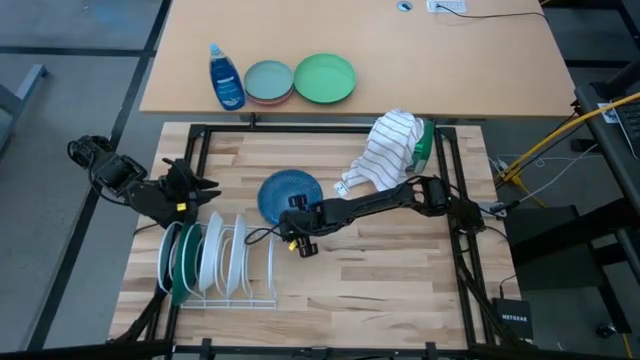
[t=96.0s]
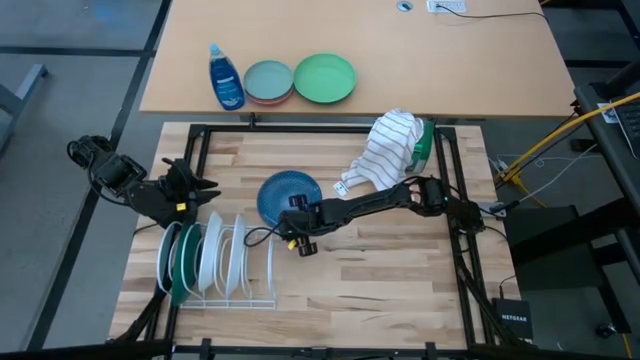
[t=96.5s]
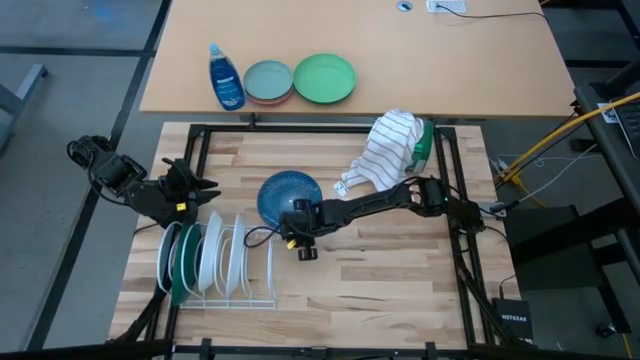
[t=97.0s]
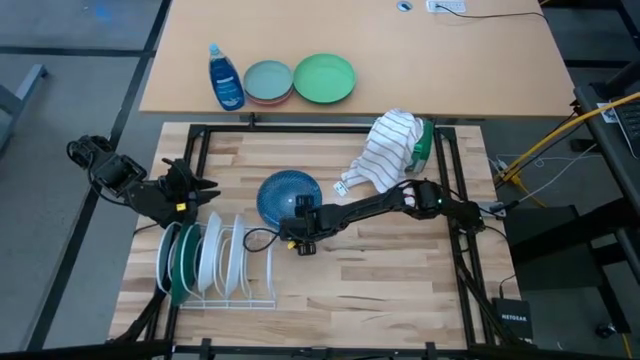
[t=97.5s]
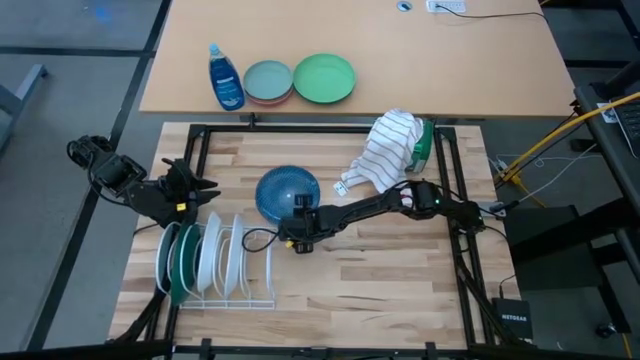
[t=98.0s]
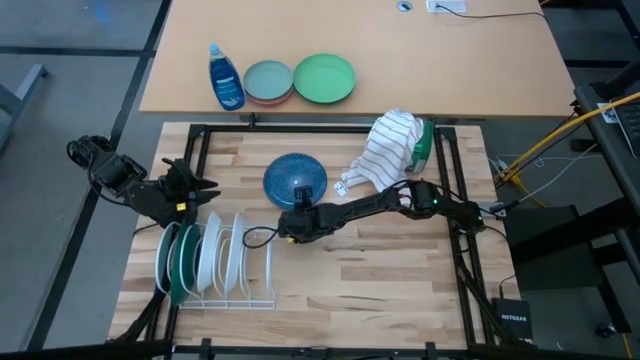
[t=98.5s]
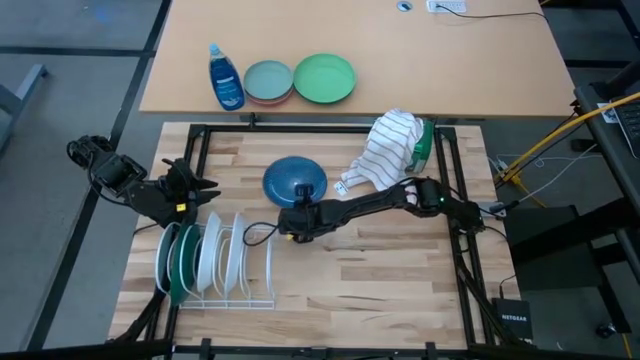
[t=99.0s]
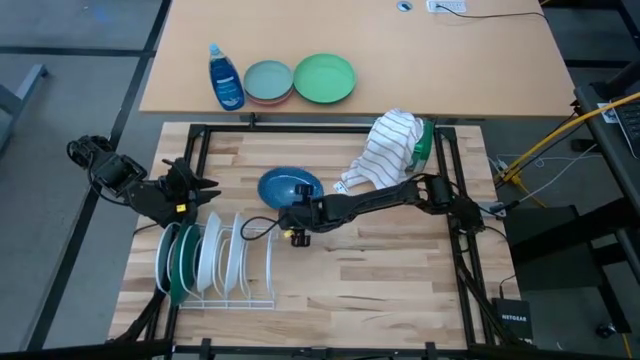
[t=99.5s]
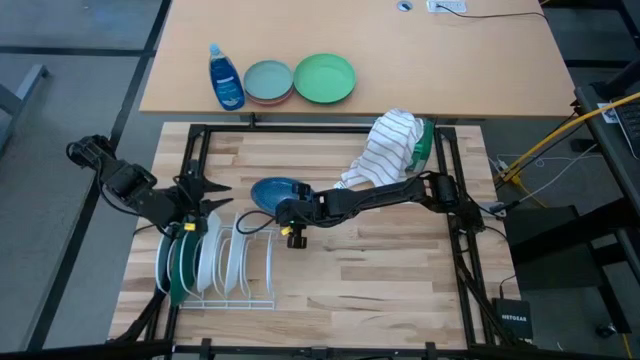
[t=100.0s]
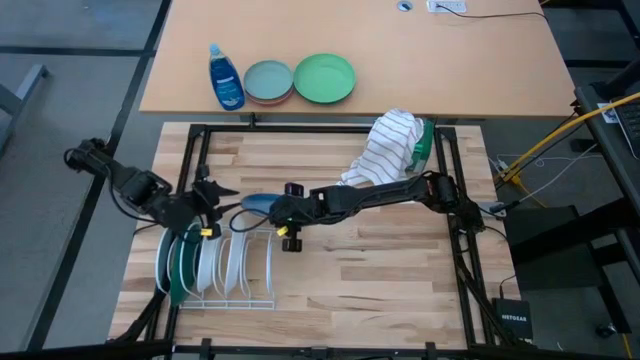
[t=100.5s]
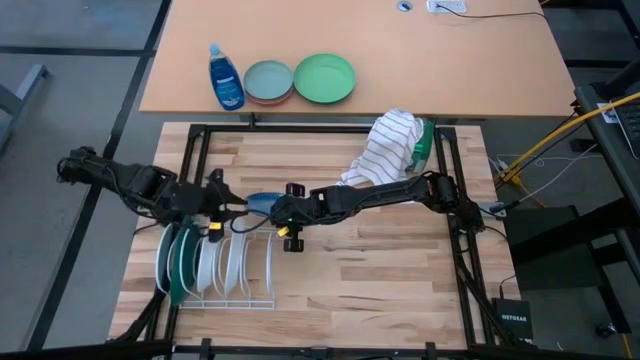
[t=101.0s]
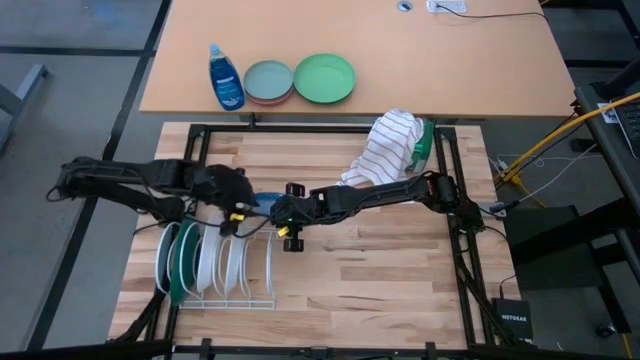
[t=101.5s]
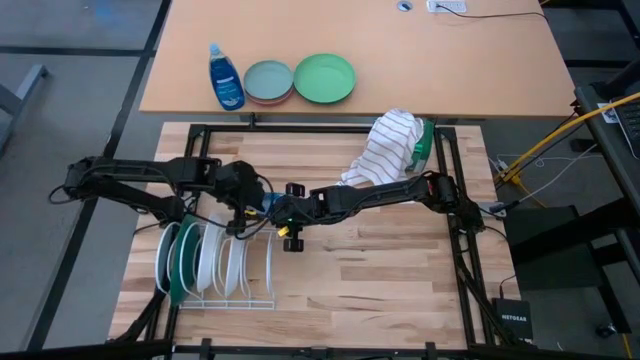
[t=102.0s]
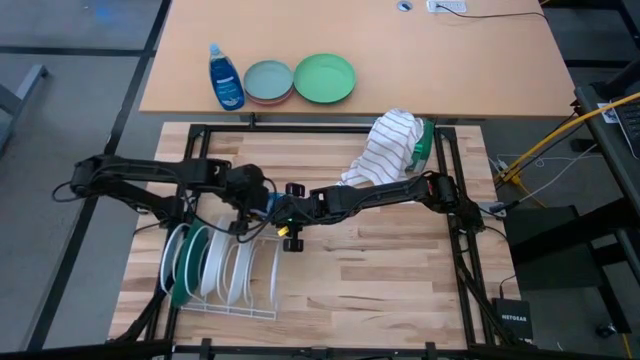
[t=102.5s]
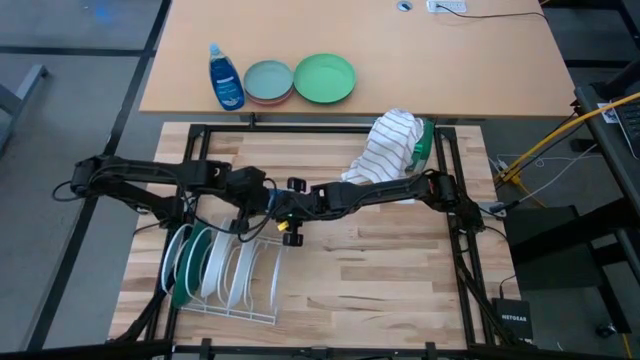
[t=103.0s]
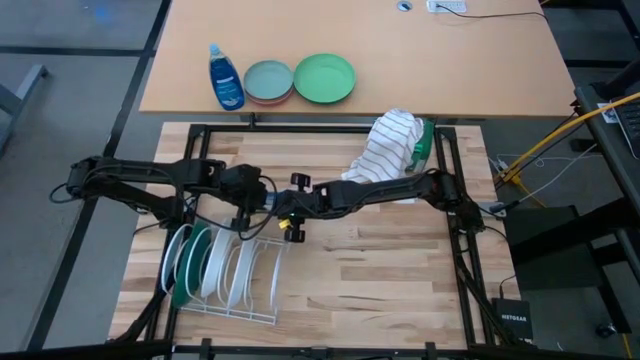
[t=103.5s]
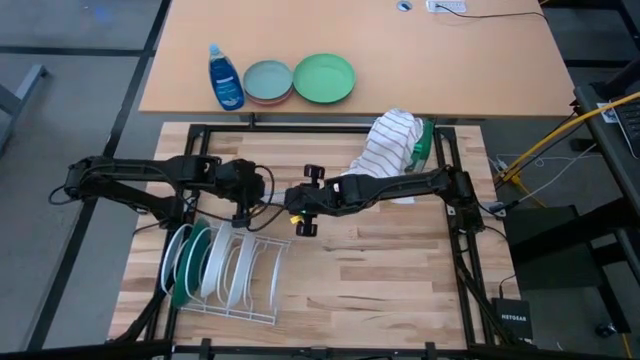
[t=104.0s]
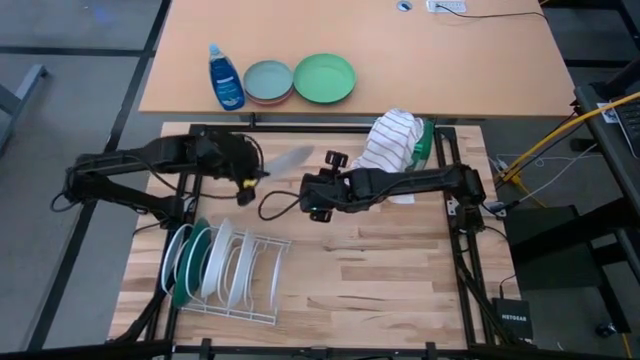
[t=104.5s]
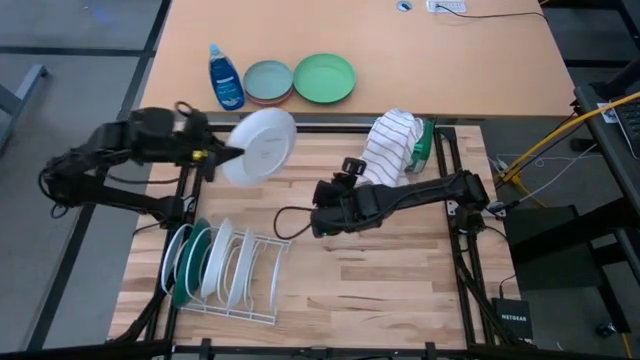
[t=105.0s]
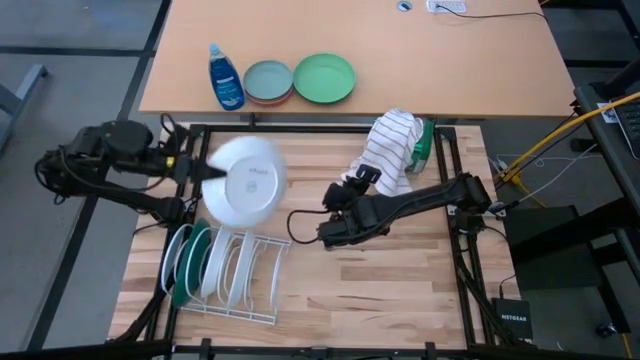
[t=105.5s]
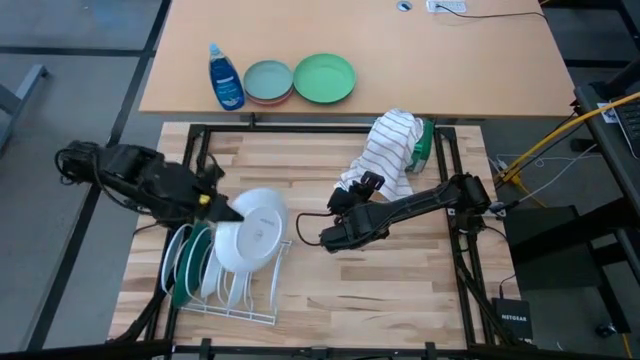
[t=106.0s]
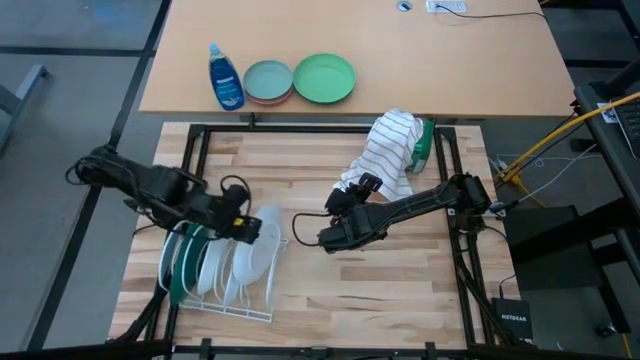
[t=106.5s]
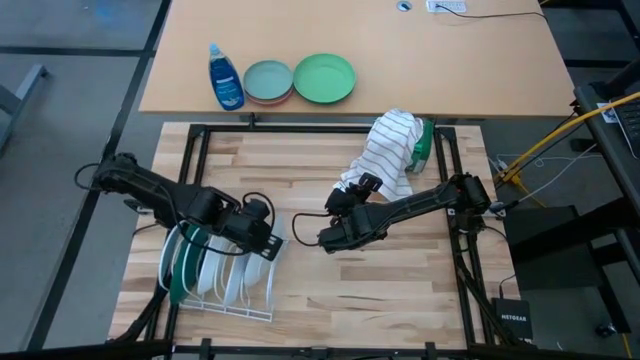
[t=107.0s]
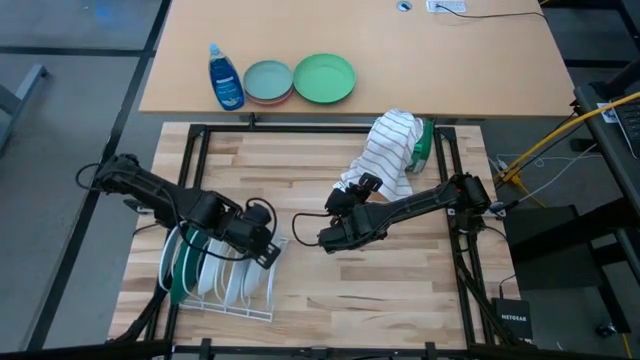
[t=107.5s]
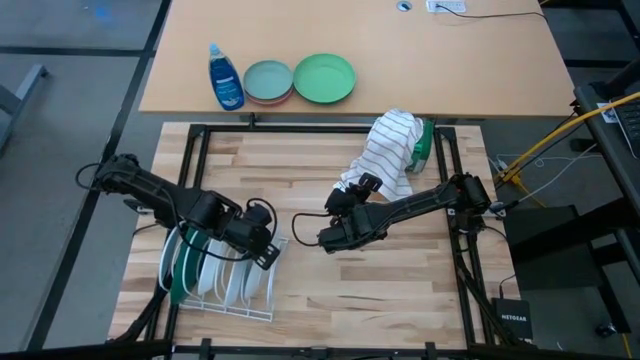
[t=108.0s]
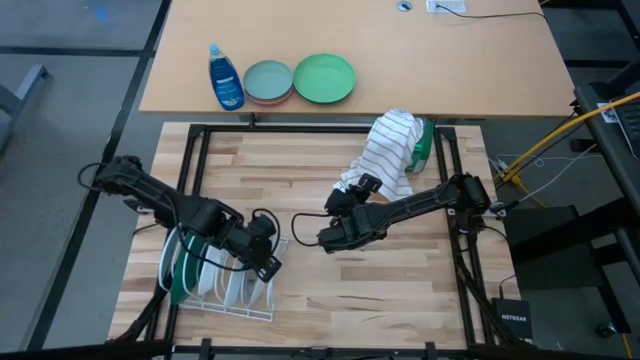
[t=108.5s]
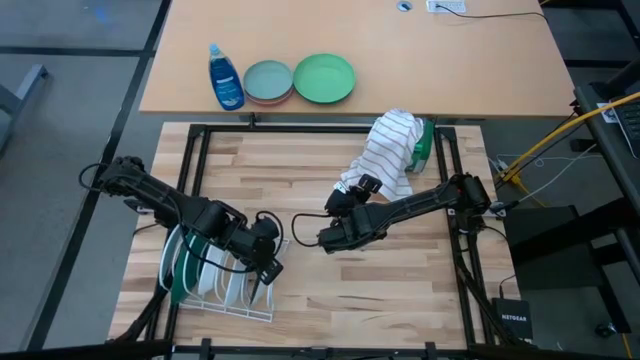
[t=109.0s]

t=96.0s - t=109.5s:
Task: Sort dishes
Put the blue plate in the white dish rack

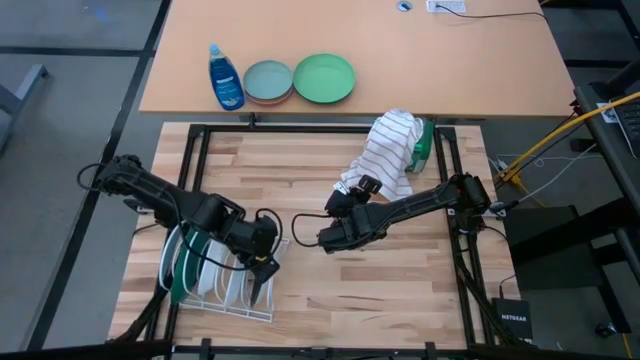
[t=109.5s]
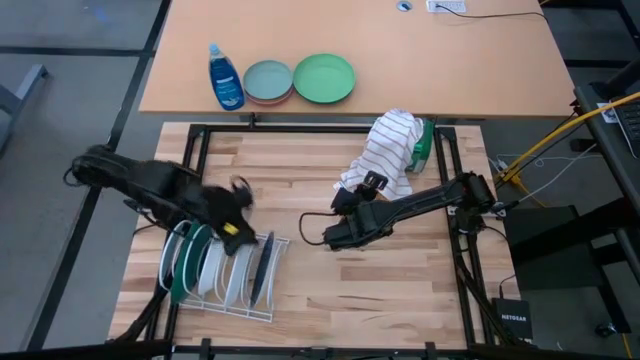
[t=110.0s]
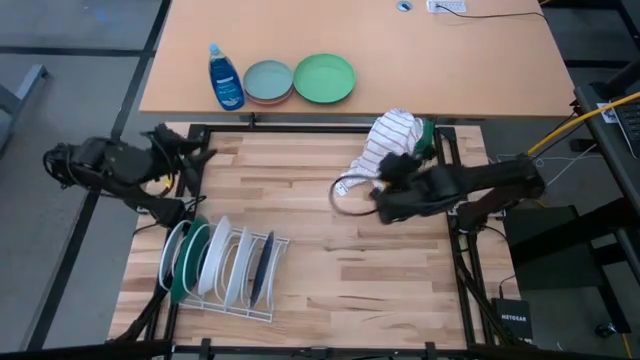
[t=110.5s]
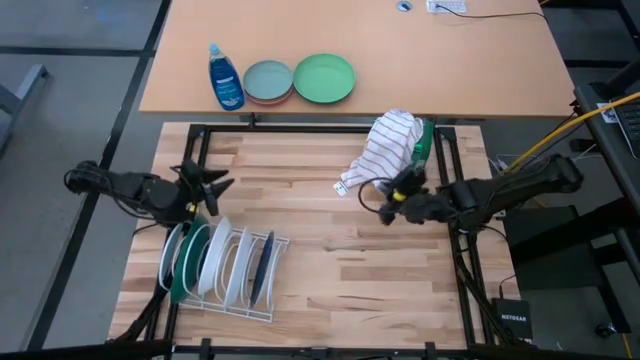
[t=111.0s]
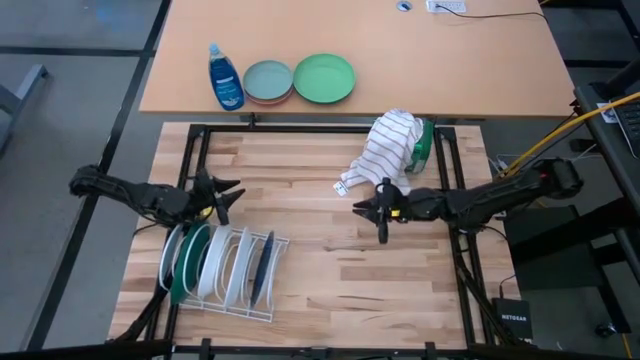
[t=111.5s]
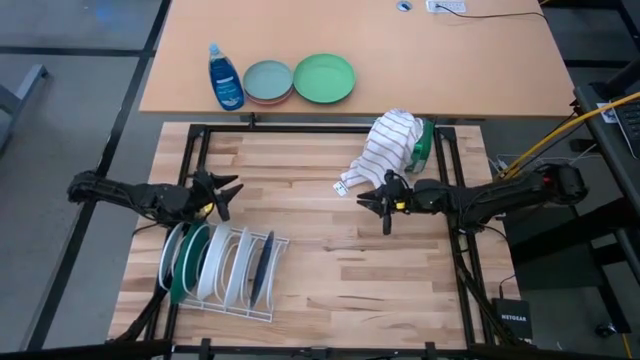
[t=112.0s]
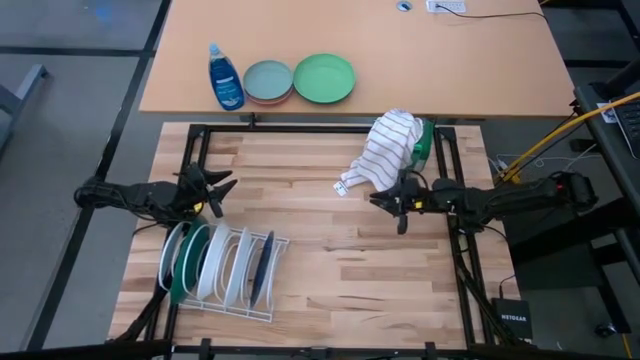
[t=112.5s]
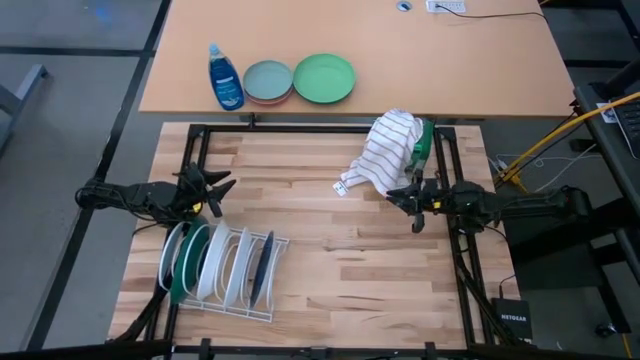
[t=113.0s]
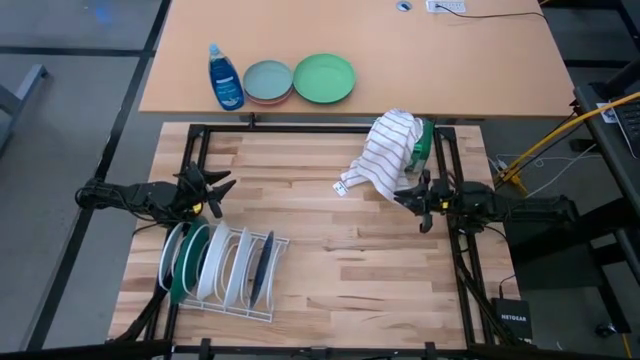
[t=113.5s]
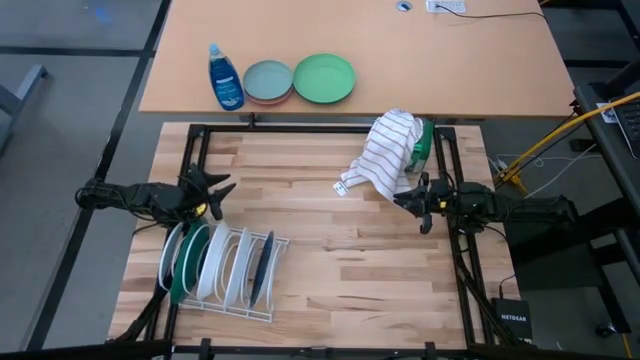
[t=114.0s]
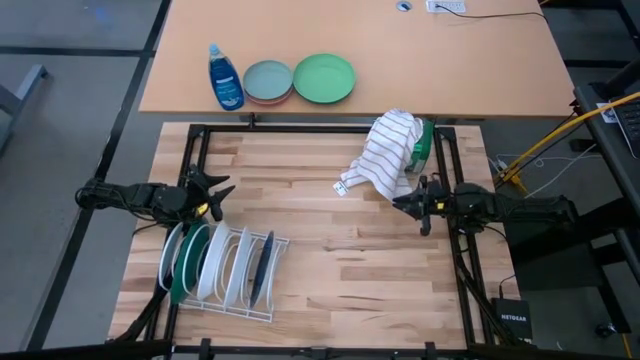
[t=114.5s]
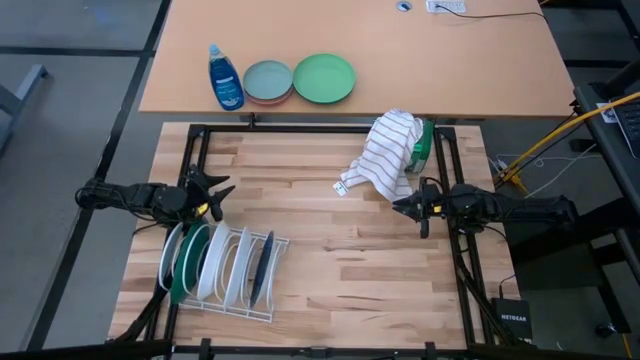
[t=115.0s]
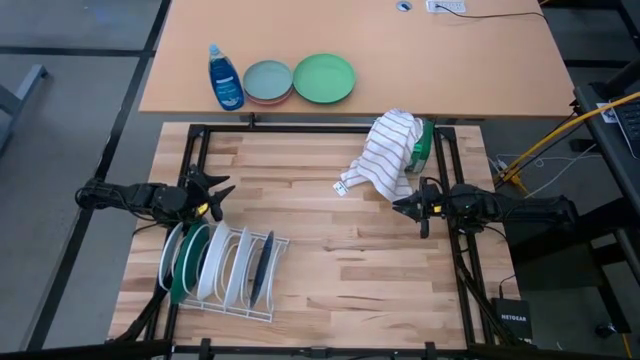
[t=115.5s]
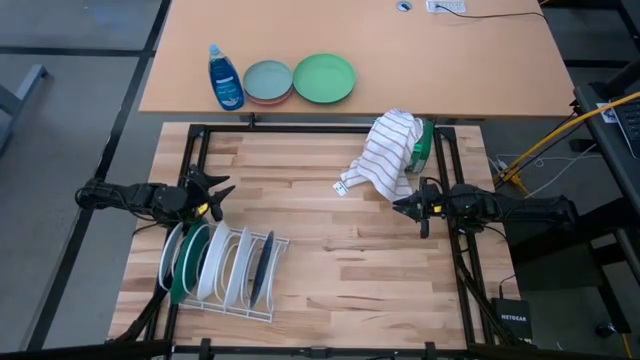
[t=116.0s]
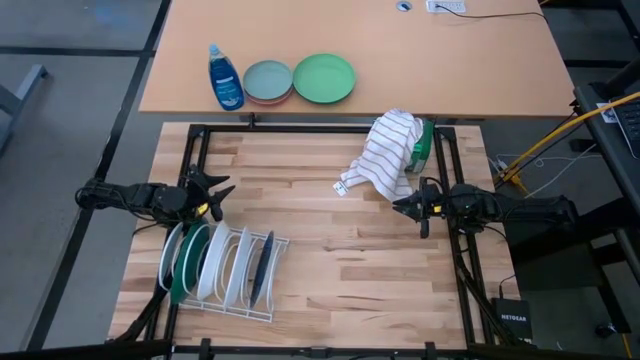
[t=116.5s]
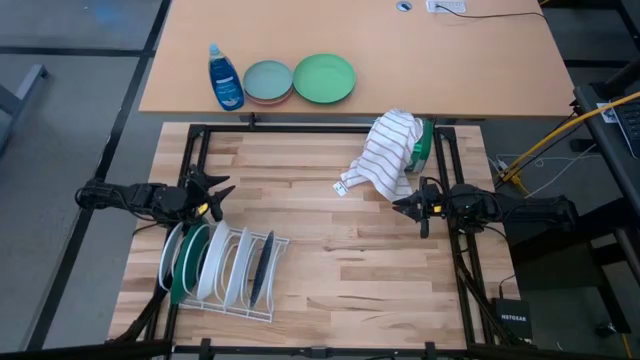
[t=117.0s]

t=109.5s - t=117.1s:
Return to Home Position

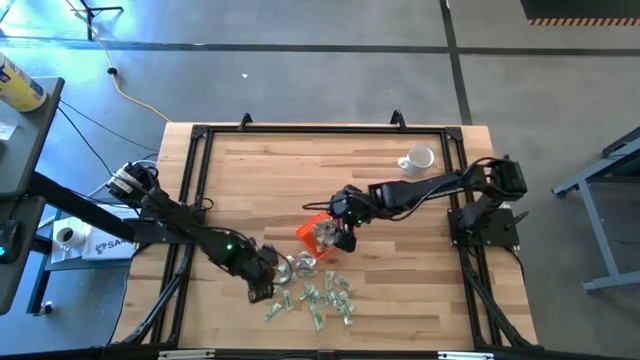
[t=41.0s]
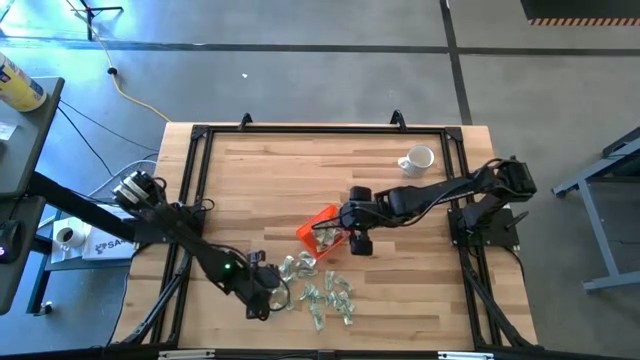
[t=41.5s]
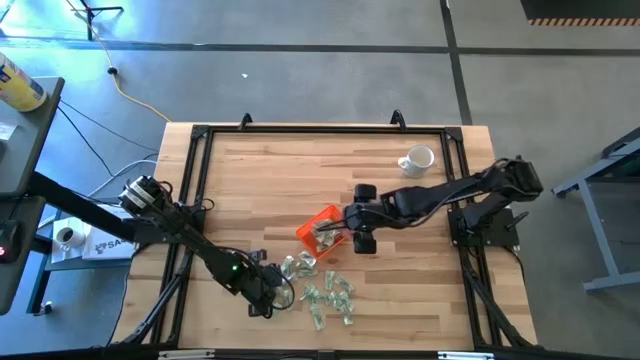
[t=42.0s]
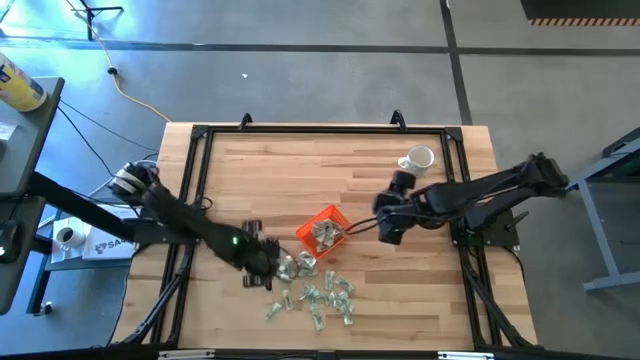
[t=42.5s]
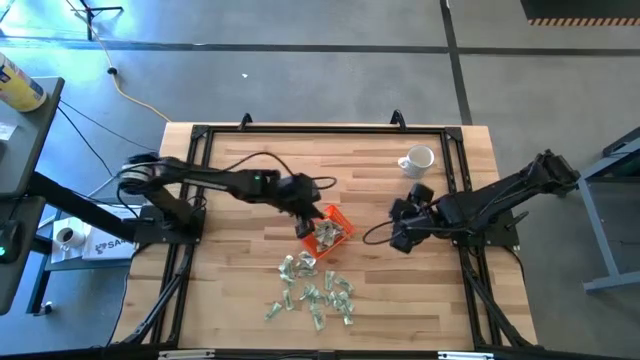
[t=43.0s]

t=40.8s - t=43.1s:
Task: Pick and place Stevia / Truvia into bins
Put the stevia packet into the orange bin
